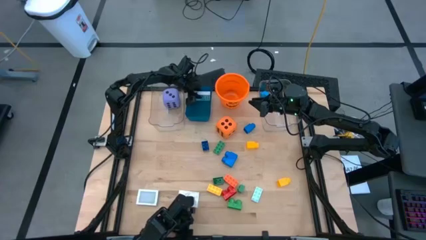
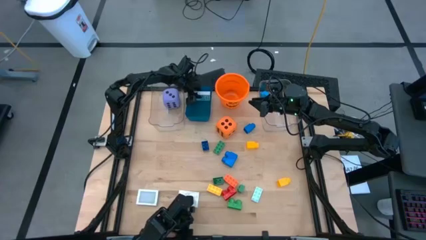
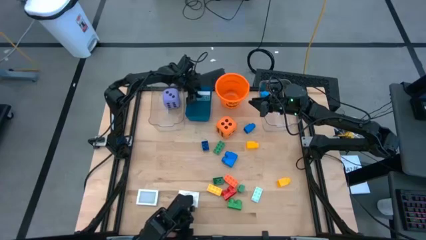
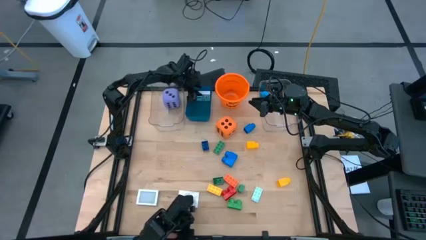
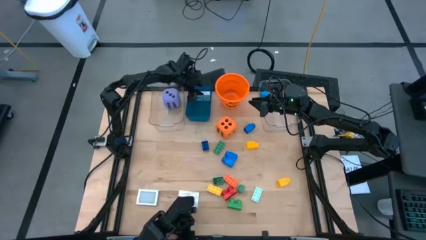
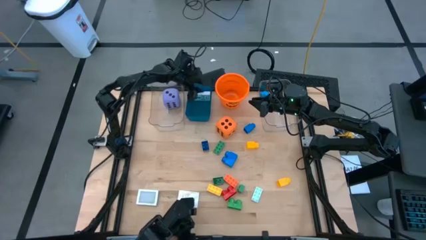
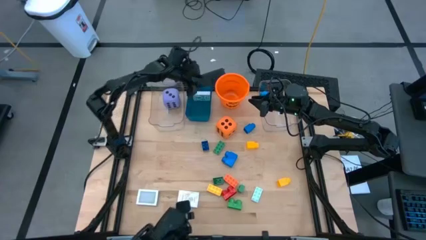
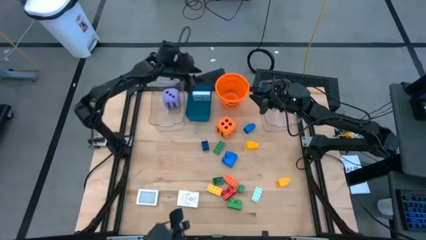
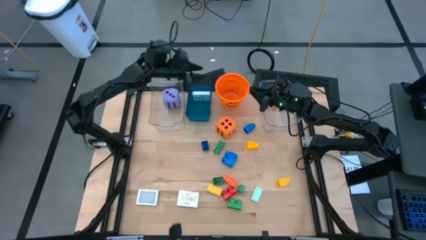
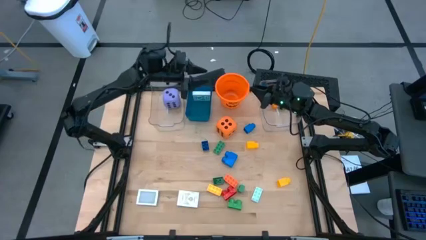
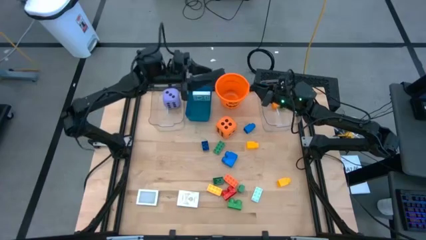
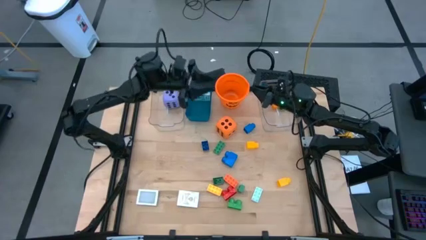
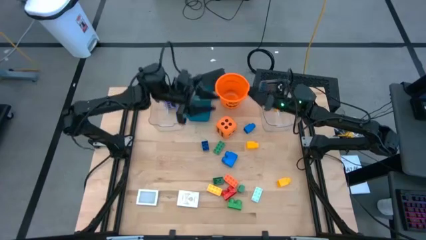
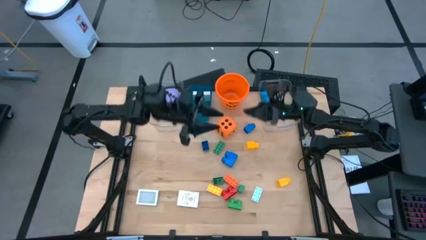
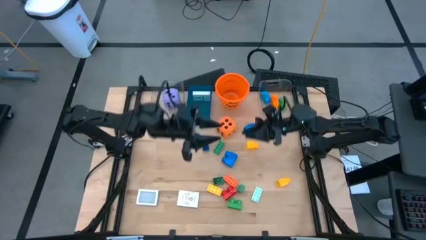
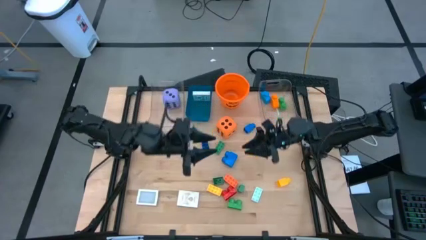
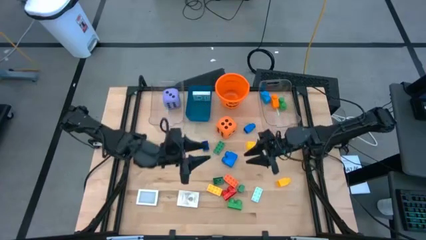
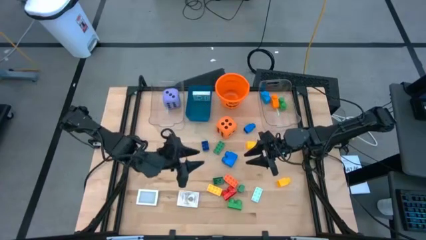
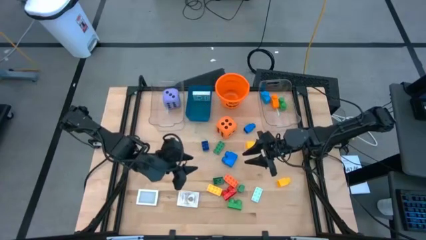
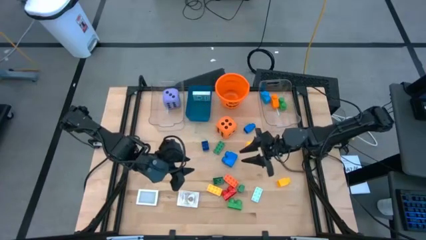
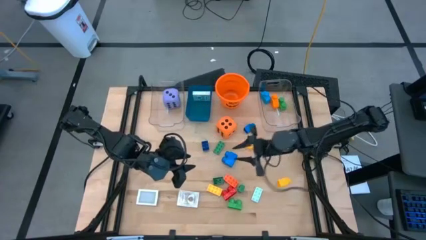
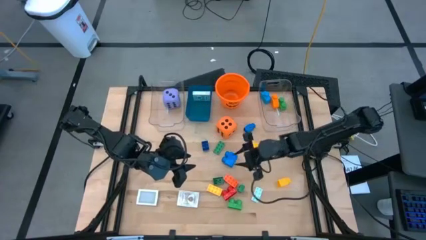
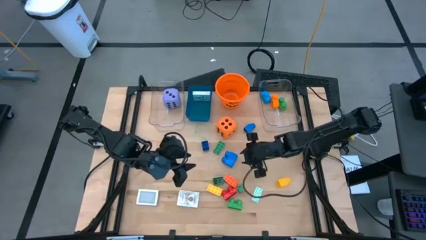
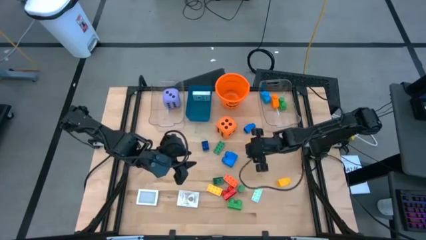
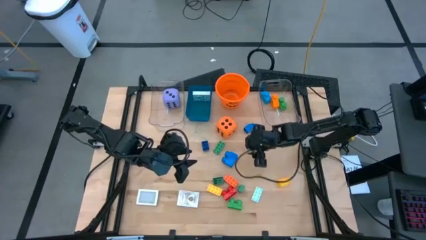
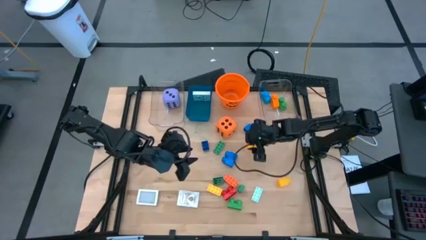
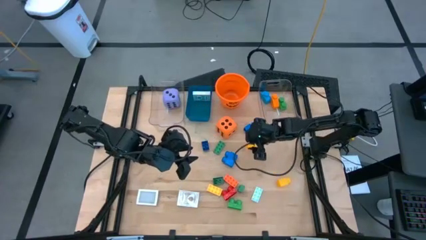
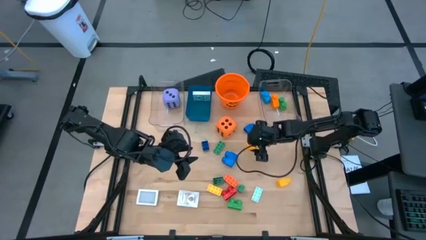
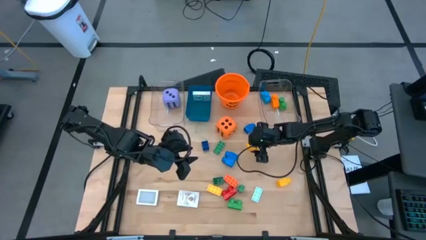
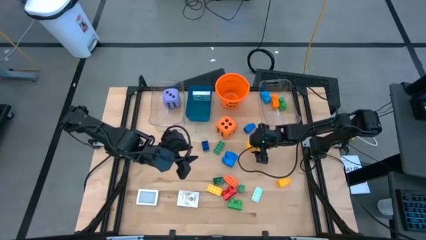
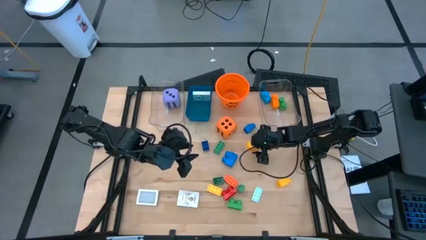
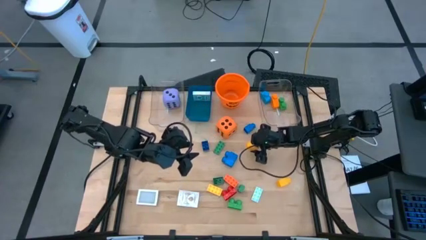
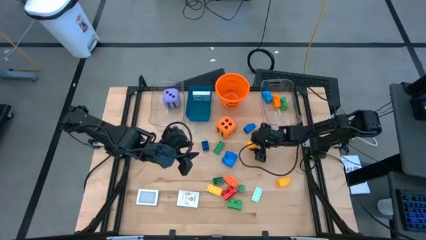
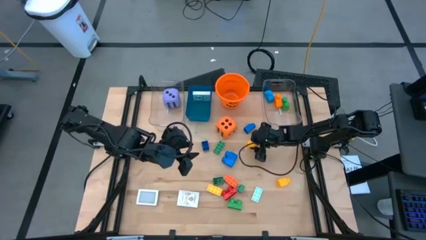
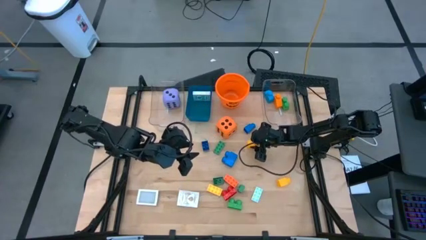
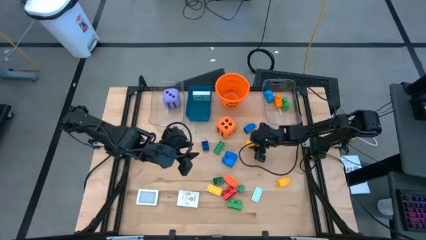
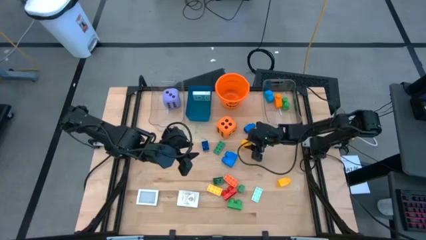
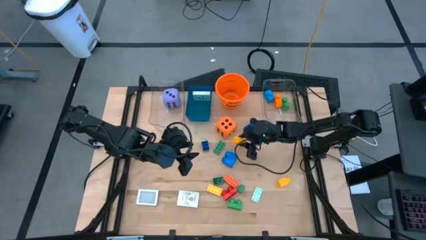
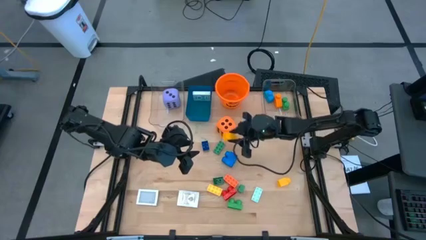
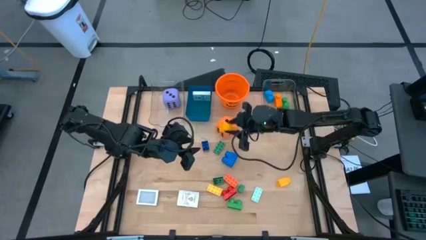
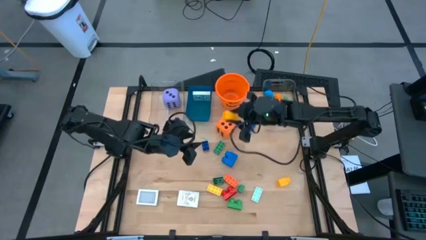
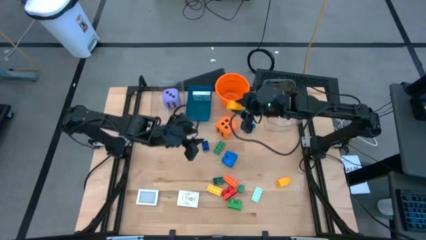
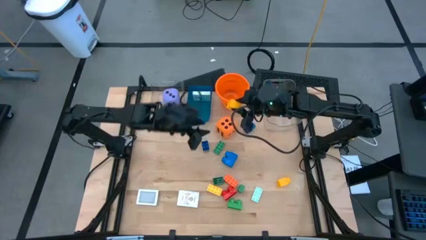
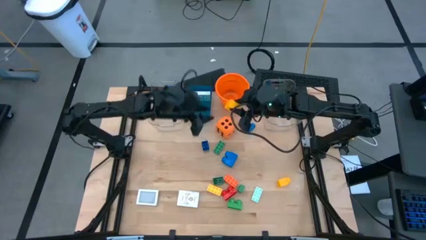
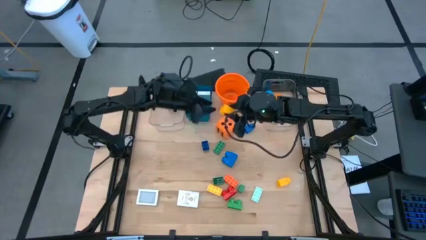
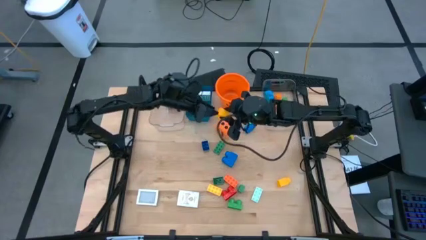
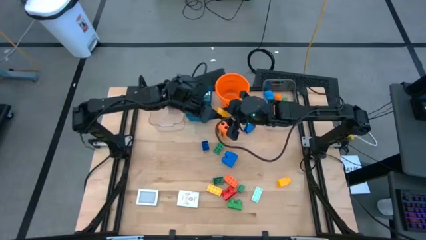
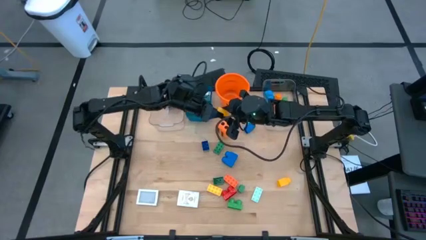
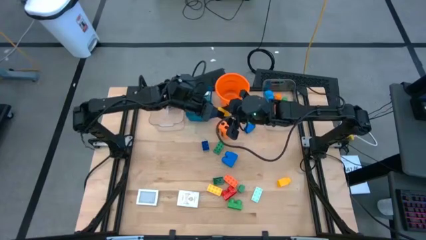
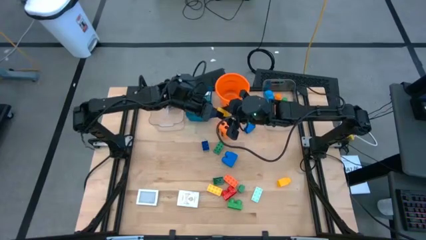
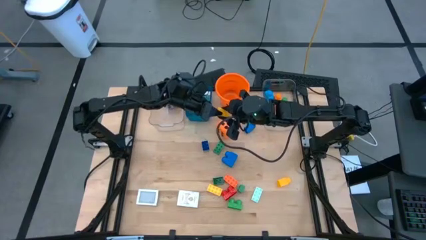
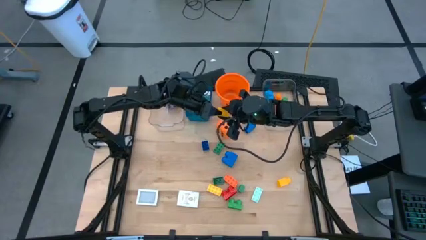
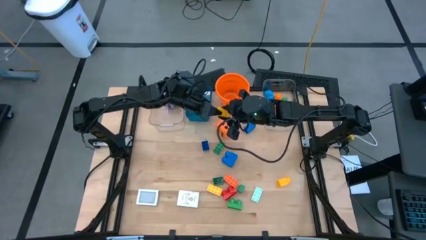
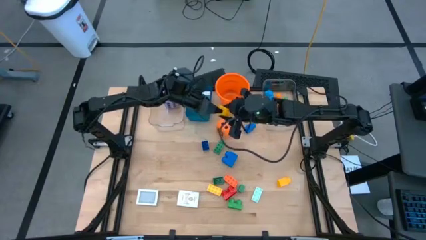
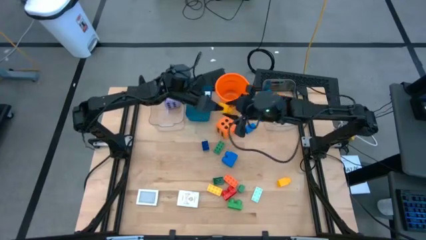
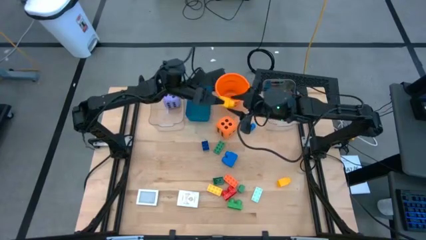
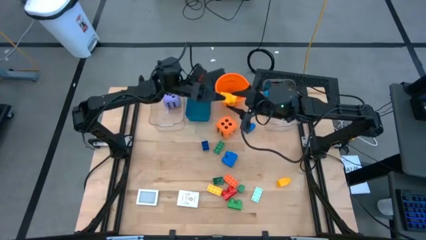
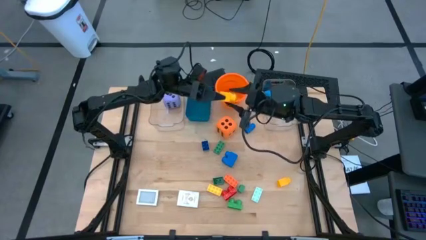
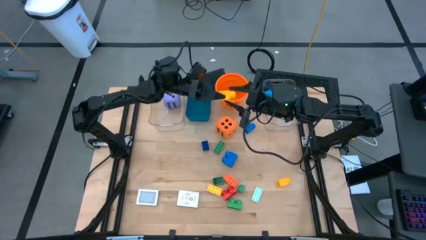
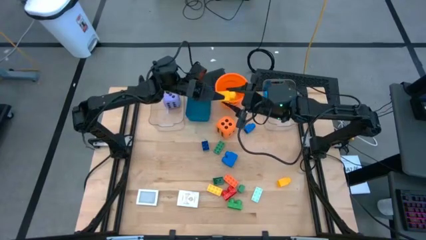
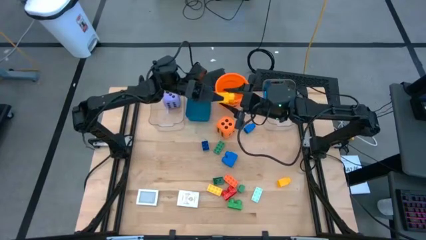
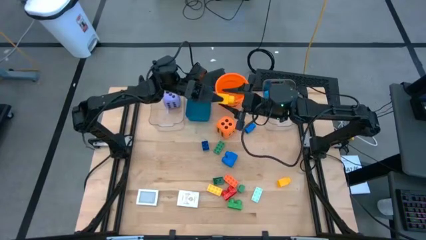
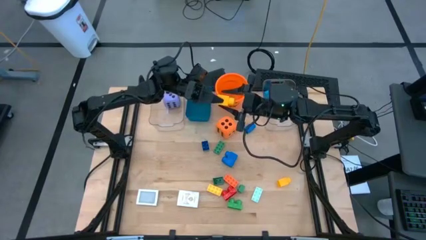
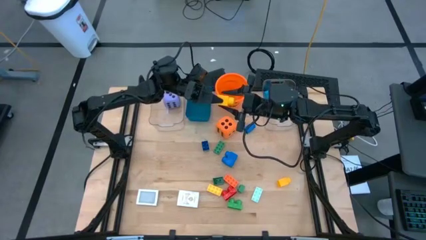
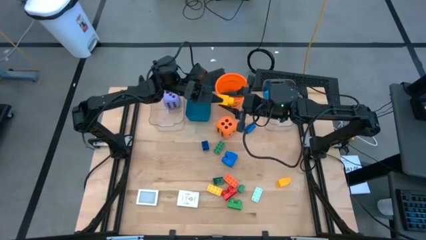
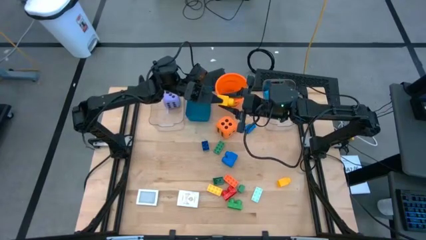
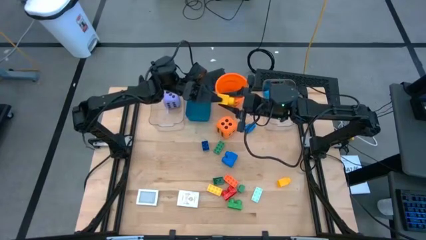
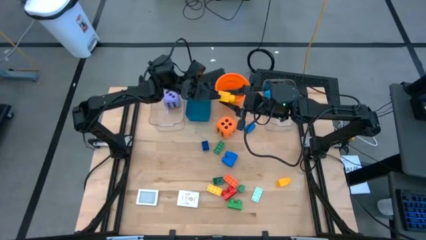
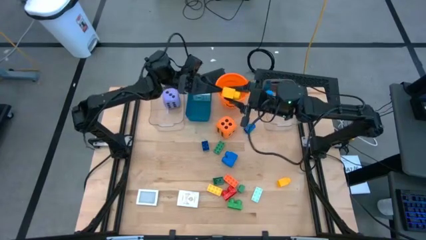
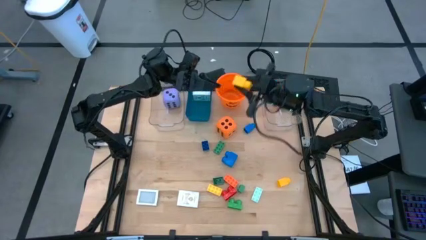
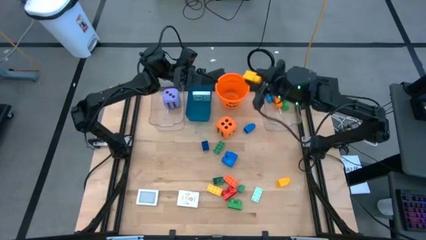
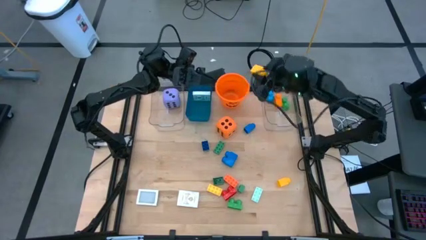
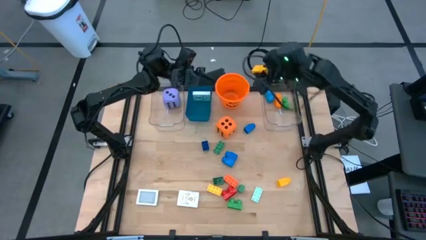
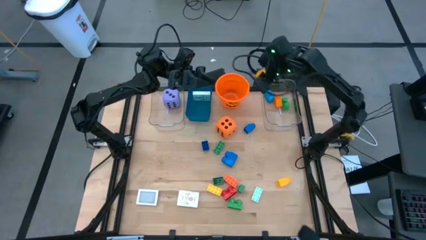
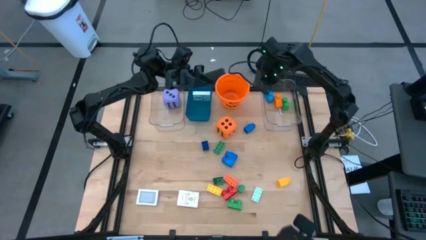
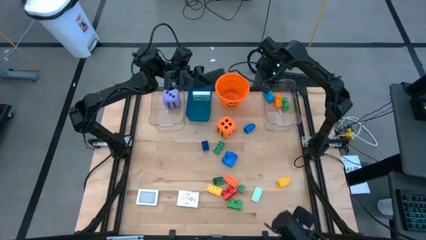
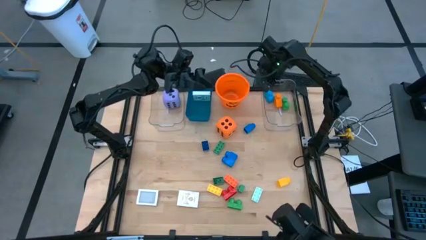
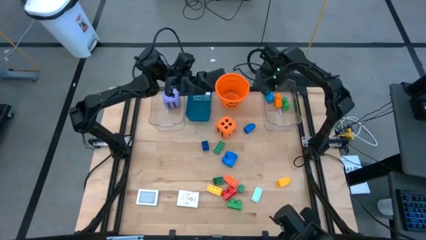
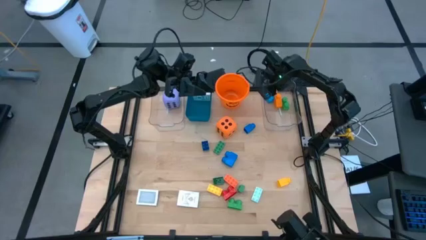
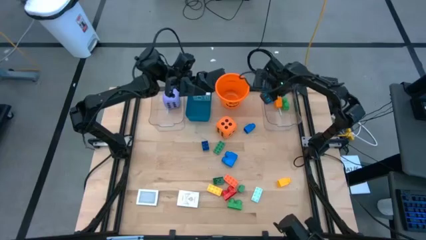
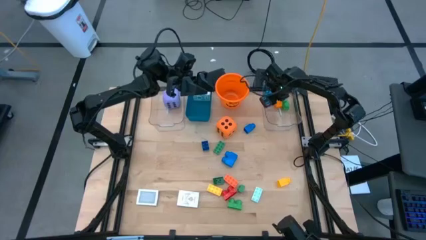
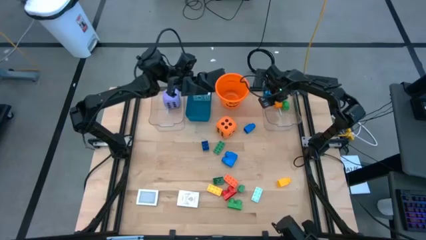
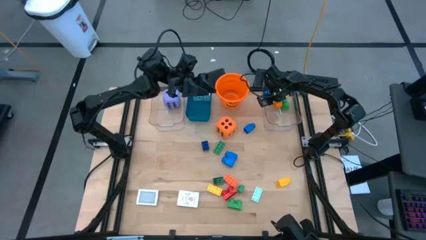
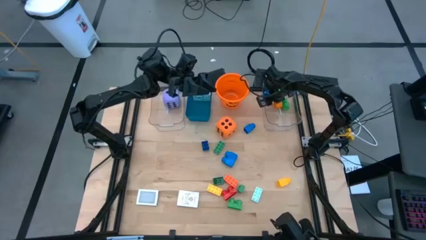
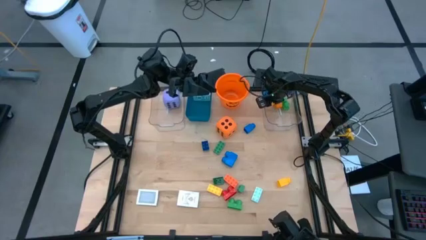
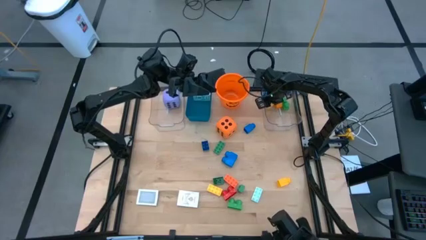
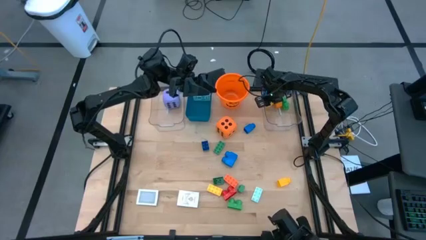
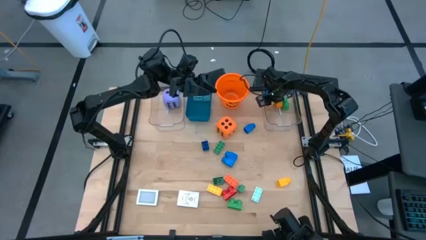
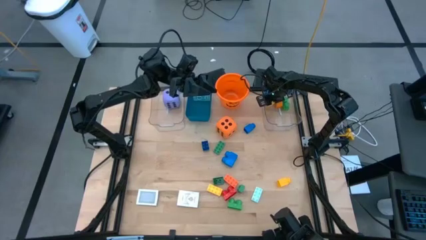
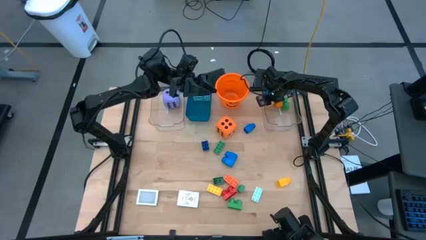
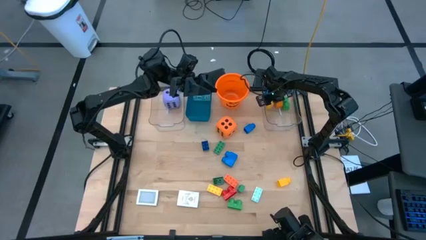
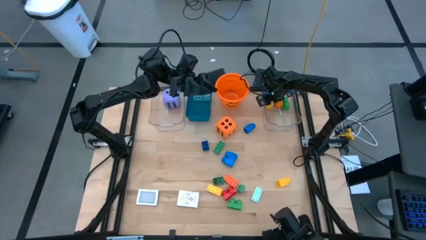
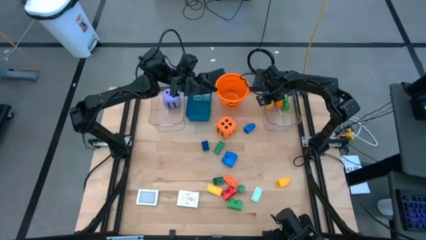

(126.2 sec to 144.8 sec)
Task: Pick & Place Toys
Put the yellow game piece into the right transparent bin
